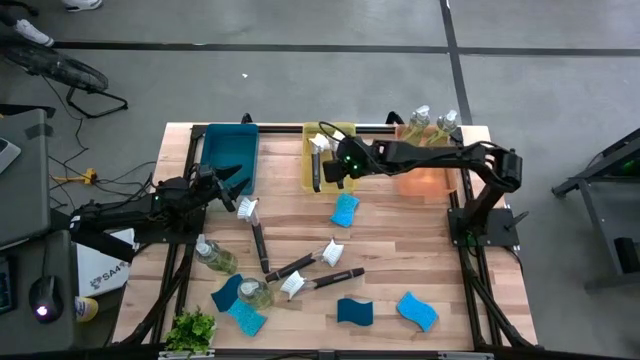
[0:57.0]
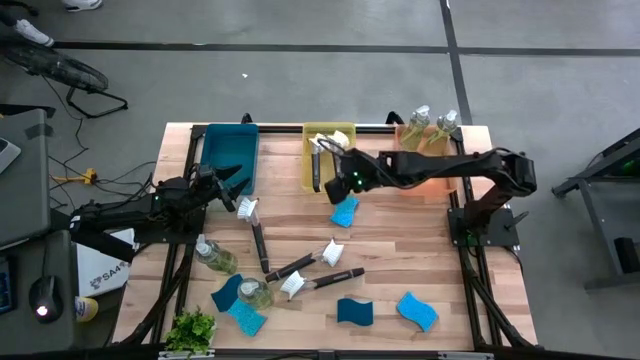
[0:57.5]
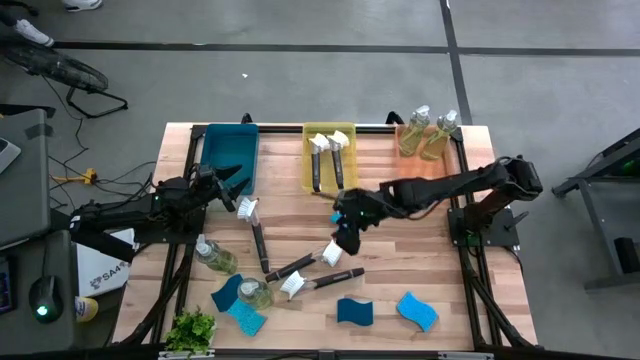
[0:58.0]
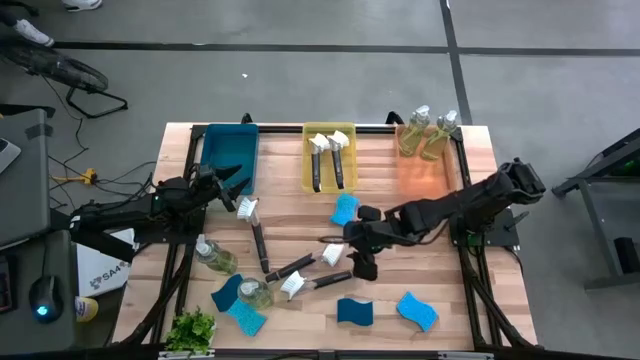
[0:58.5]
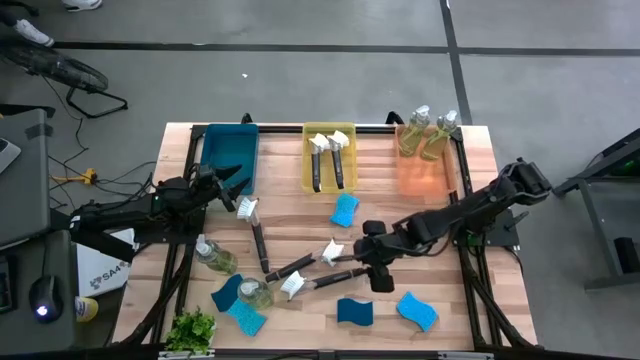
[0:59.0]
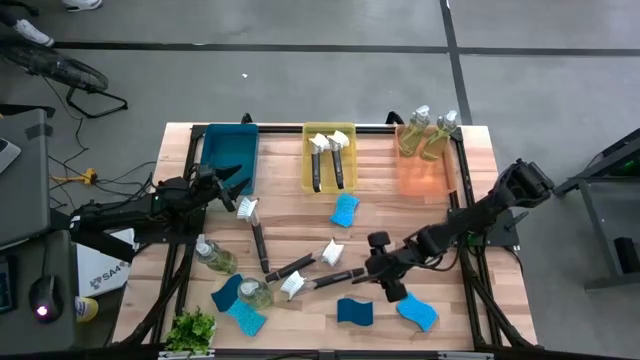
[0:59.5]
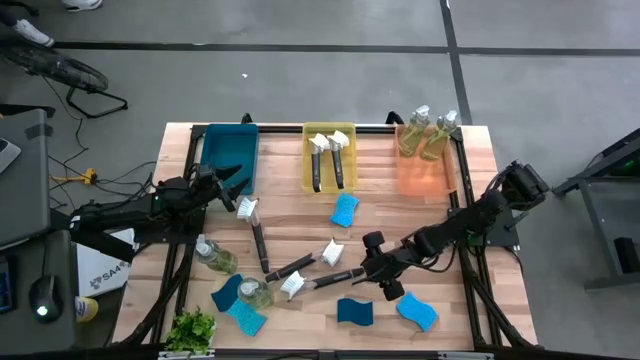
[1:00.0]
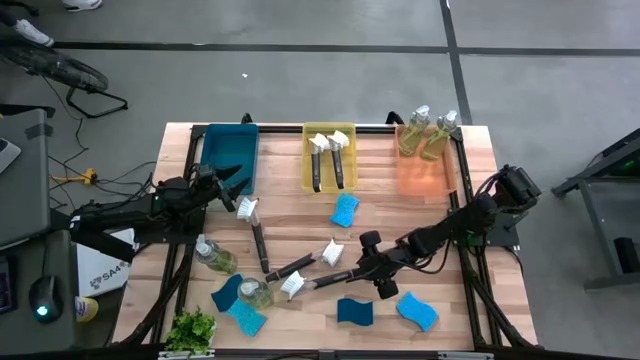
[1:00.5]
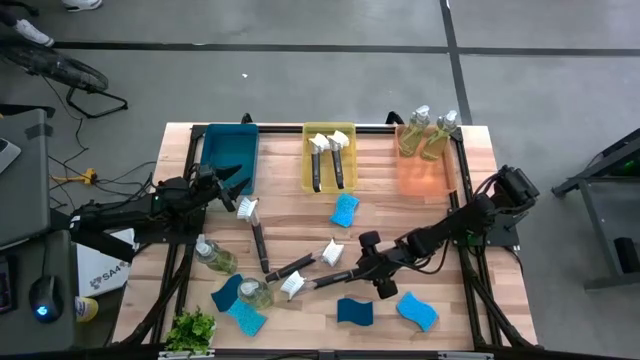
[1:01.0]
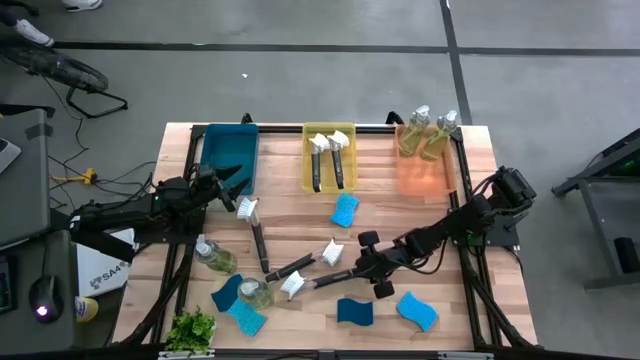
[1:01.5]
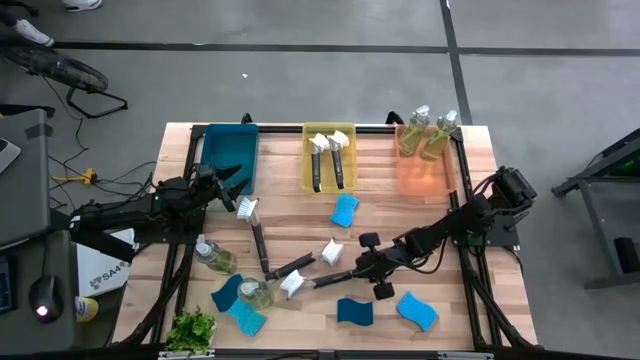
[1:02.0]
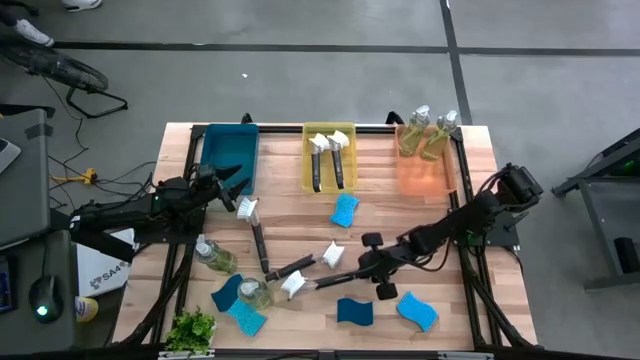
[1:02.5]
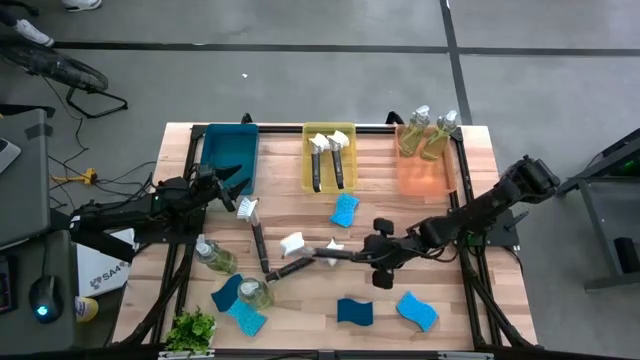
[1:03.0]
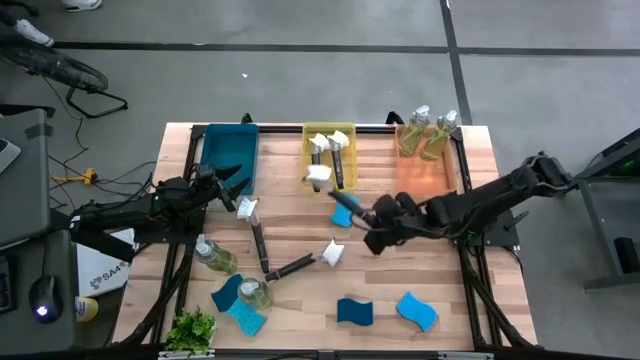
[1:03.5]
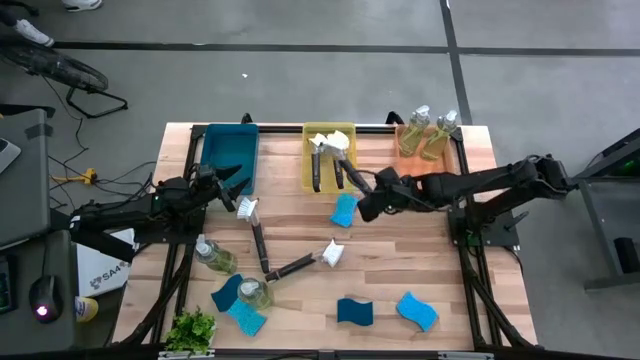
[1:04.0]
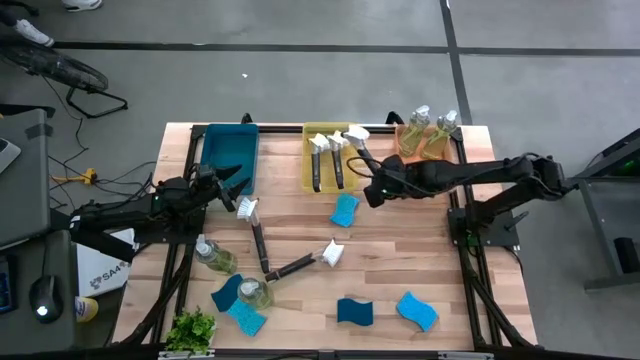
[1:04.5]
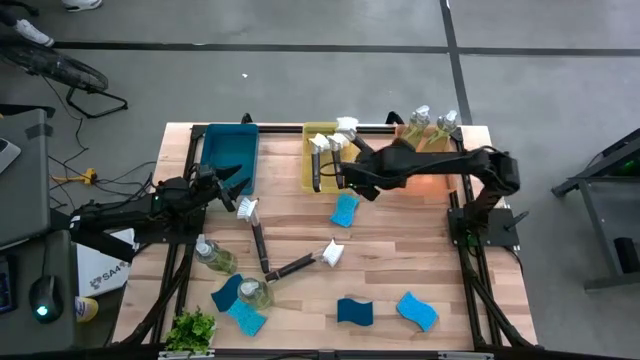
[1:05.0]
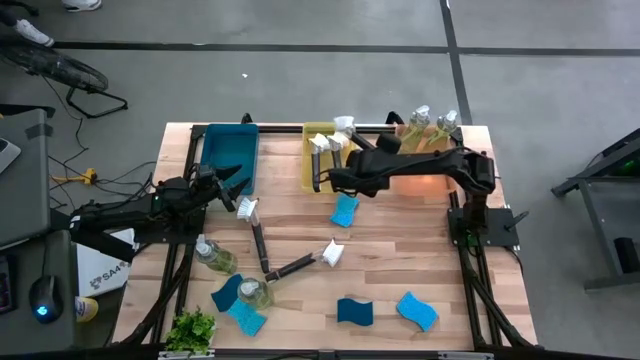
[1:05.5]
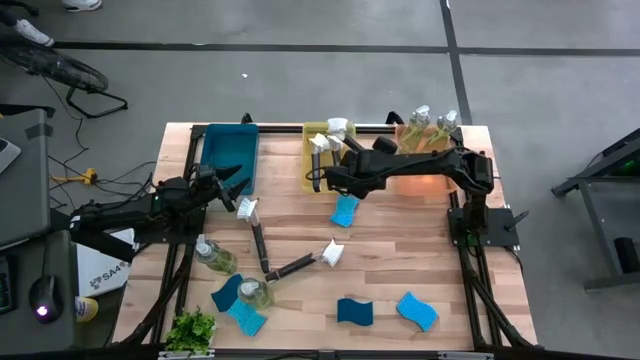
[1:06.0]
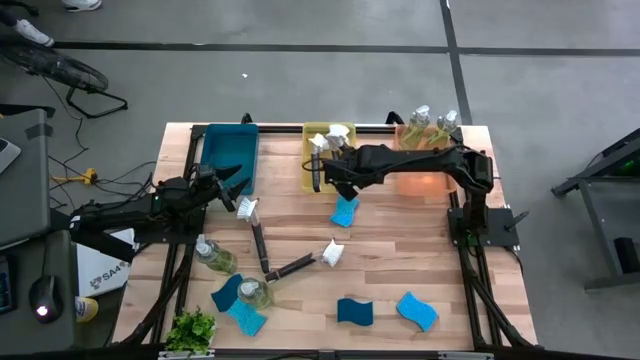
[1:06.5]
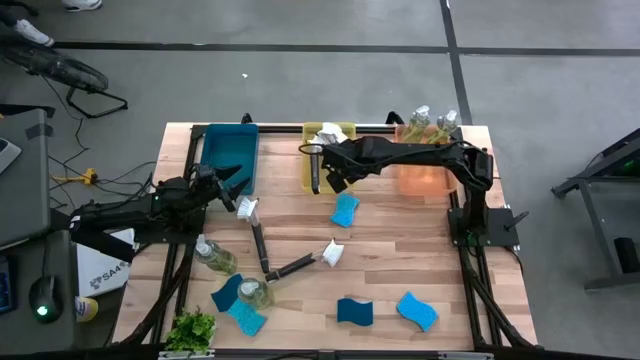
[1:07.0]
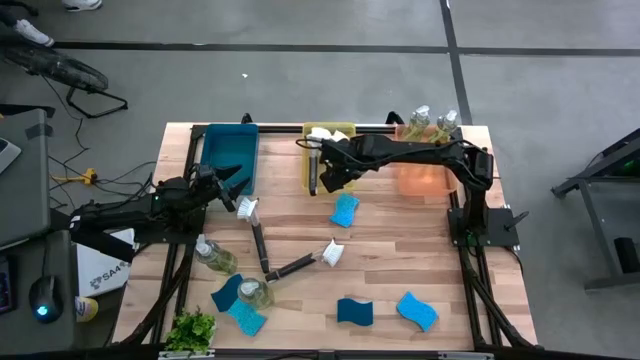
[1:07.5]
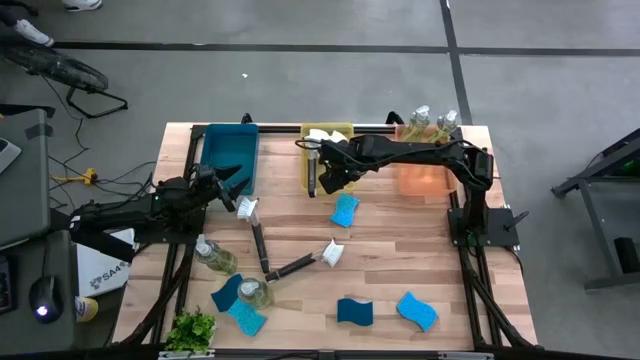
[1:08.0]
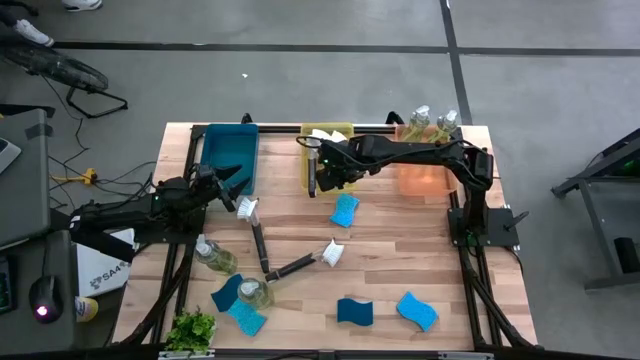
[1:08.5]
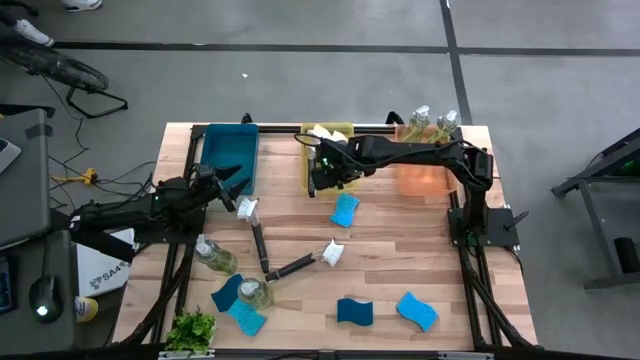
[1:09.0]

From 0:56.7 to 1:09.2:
Task: Pick & Place Kitchen Sink Supplies
Put the black dishwashing brush into the yellow bin
